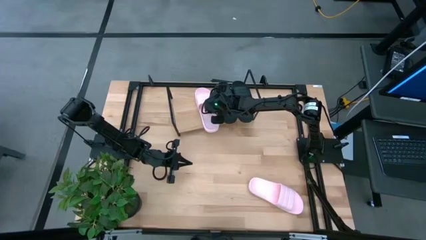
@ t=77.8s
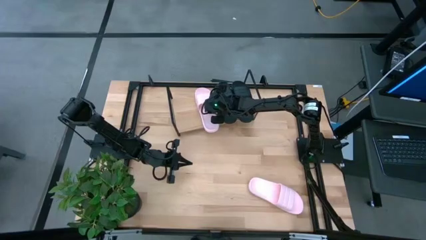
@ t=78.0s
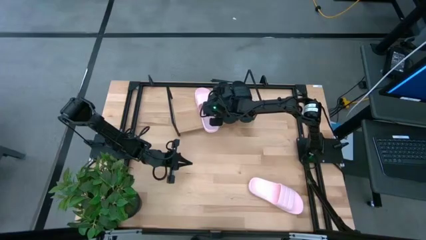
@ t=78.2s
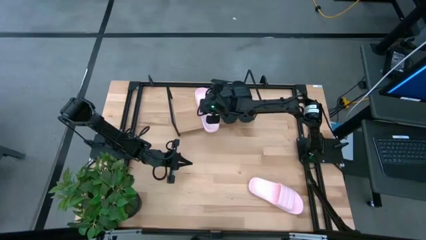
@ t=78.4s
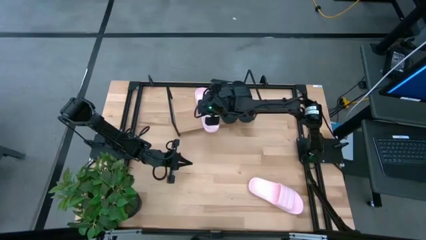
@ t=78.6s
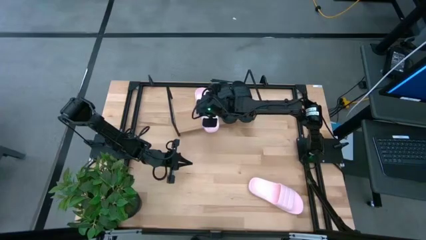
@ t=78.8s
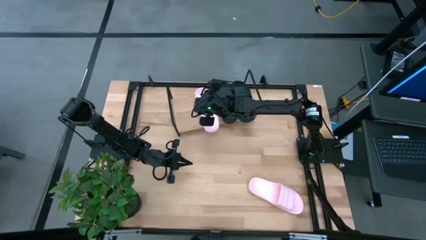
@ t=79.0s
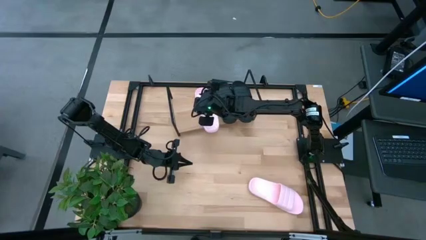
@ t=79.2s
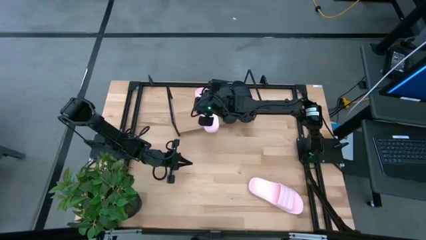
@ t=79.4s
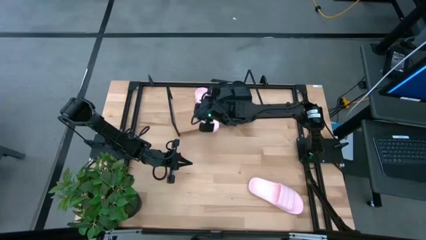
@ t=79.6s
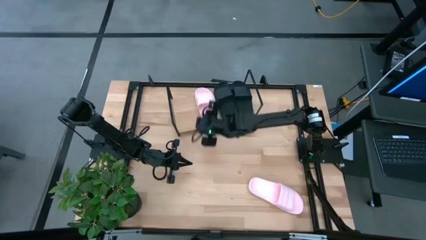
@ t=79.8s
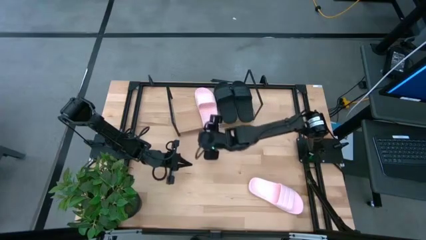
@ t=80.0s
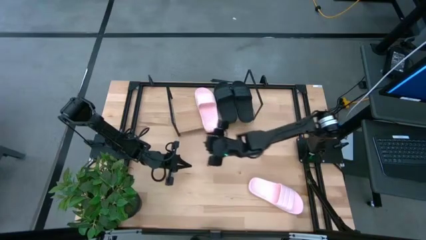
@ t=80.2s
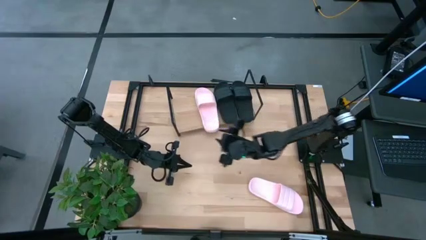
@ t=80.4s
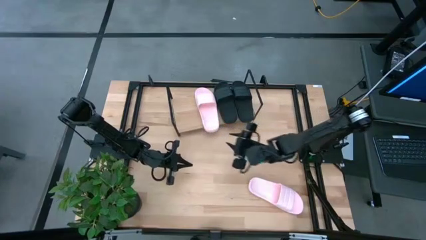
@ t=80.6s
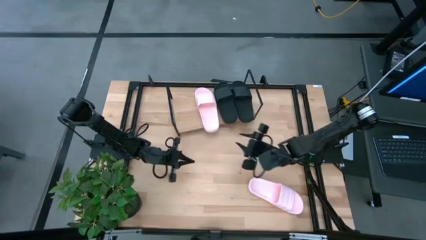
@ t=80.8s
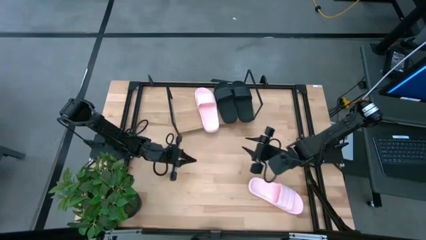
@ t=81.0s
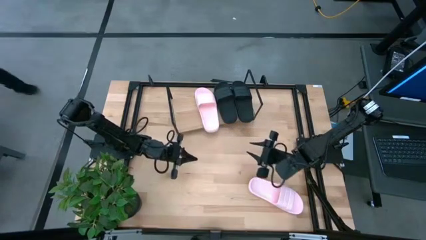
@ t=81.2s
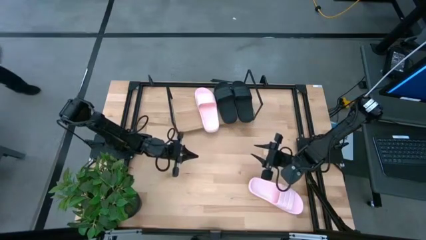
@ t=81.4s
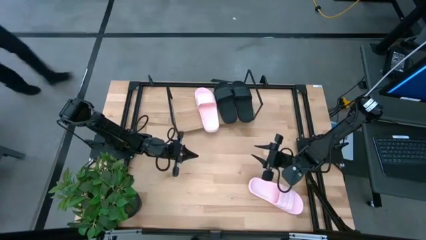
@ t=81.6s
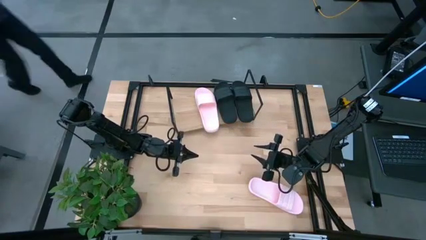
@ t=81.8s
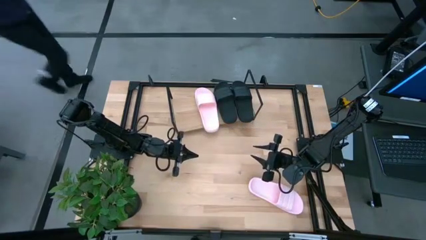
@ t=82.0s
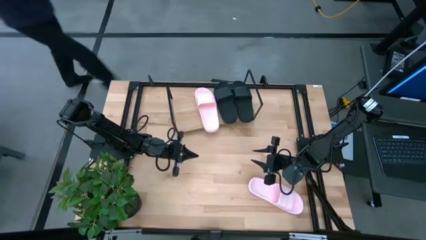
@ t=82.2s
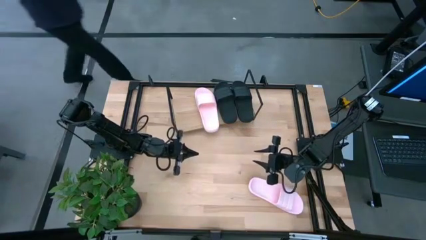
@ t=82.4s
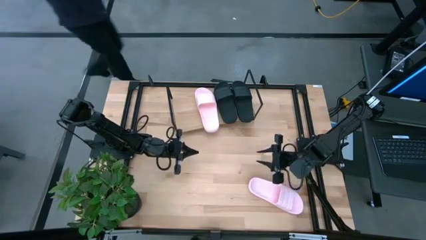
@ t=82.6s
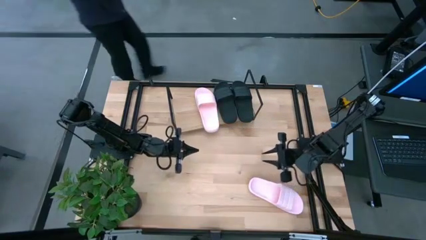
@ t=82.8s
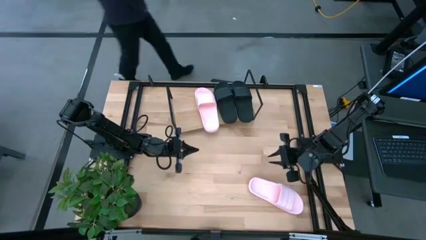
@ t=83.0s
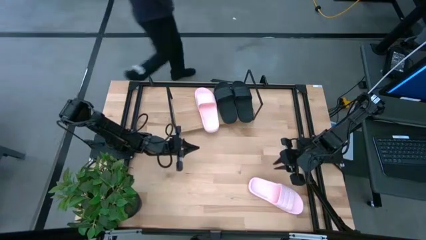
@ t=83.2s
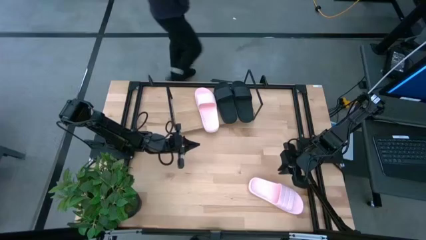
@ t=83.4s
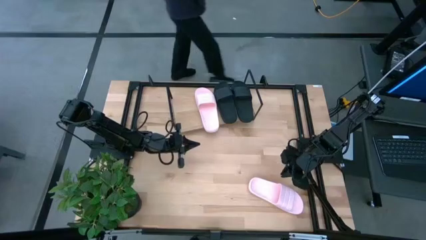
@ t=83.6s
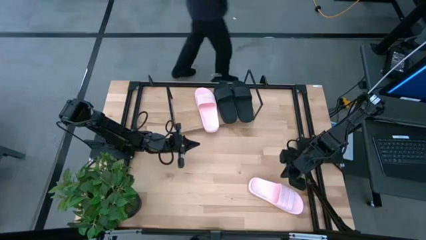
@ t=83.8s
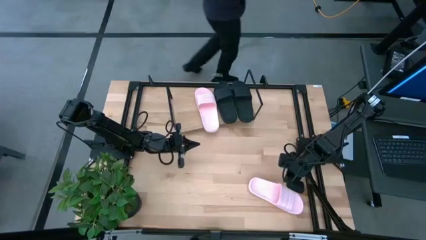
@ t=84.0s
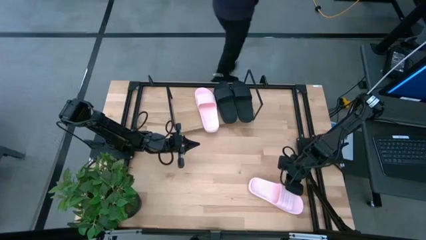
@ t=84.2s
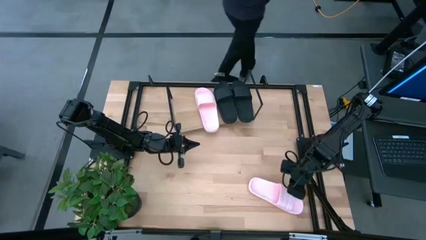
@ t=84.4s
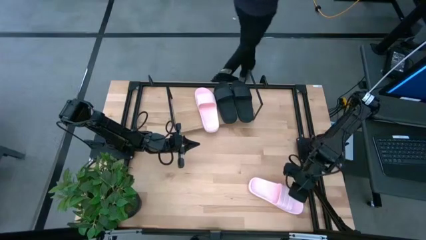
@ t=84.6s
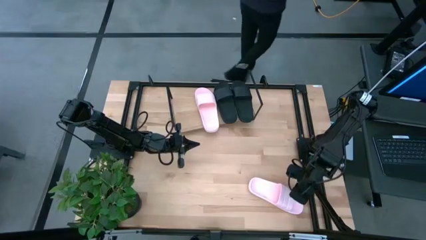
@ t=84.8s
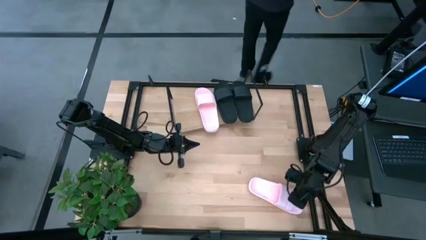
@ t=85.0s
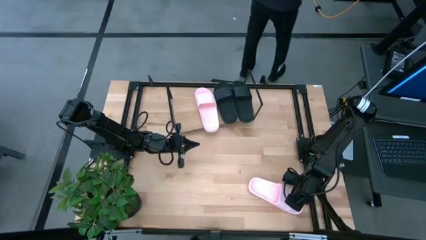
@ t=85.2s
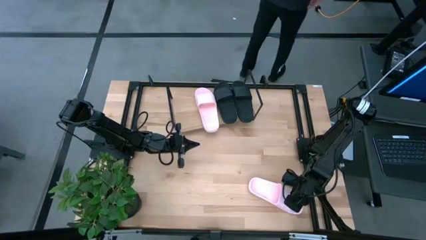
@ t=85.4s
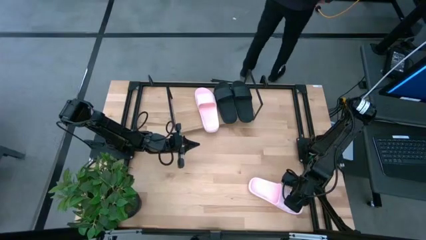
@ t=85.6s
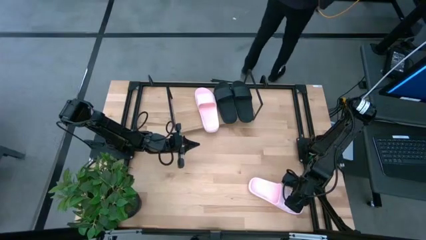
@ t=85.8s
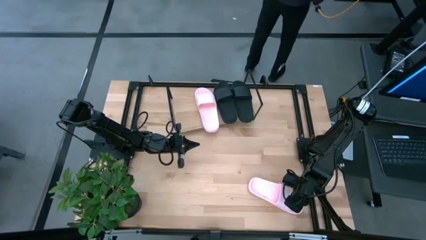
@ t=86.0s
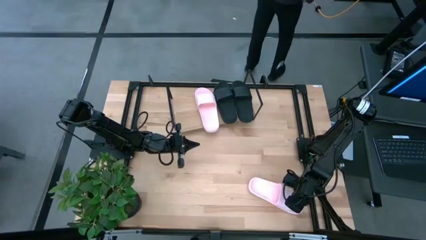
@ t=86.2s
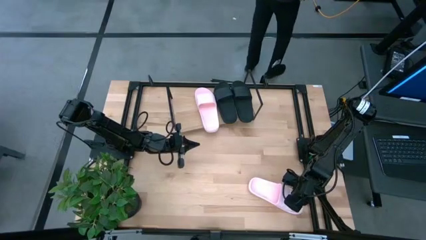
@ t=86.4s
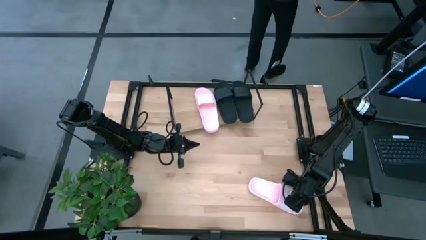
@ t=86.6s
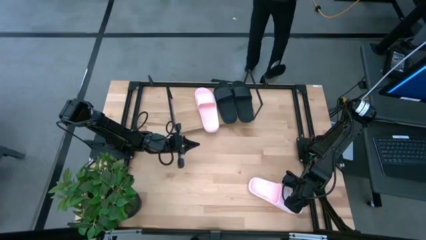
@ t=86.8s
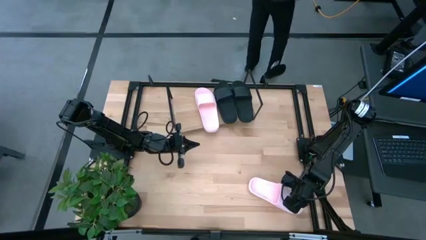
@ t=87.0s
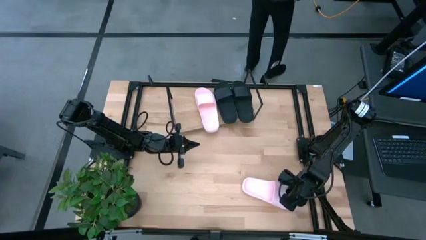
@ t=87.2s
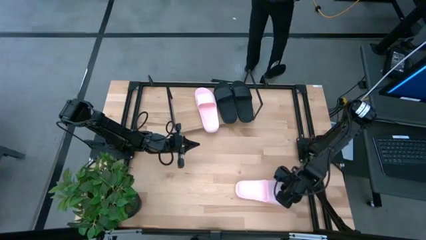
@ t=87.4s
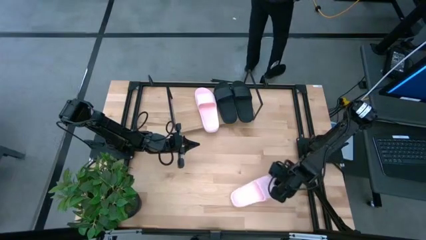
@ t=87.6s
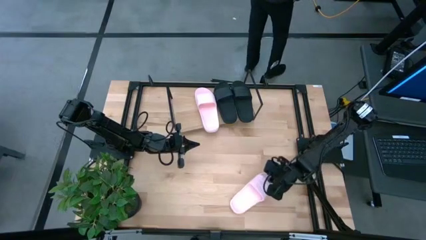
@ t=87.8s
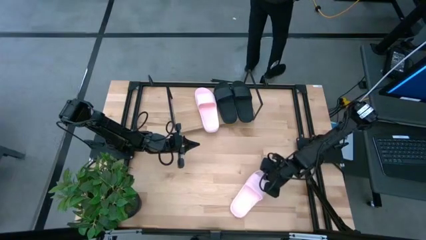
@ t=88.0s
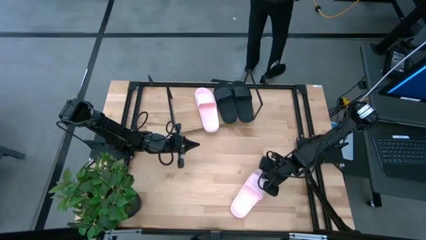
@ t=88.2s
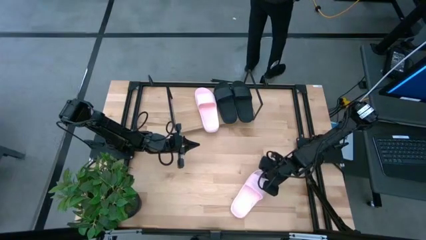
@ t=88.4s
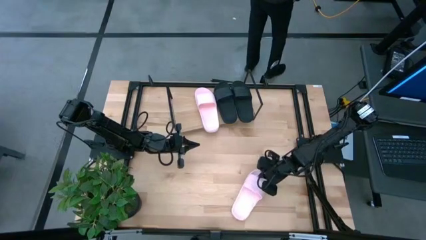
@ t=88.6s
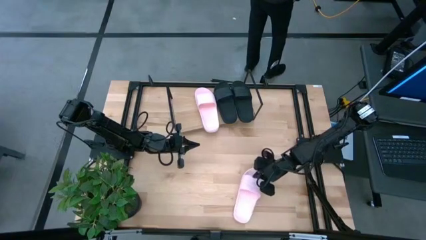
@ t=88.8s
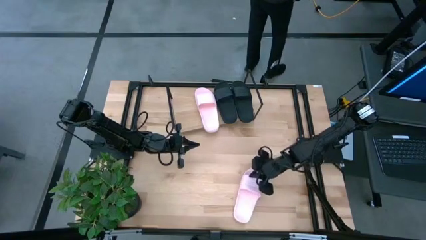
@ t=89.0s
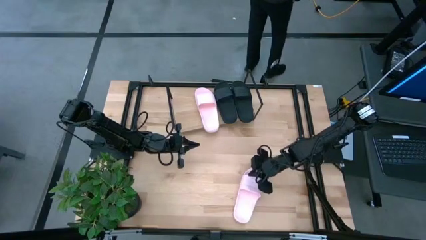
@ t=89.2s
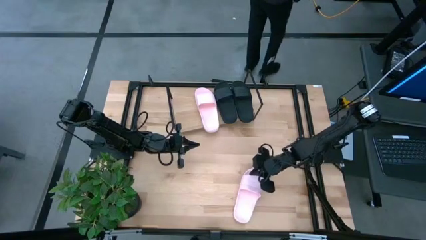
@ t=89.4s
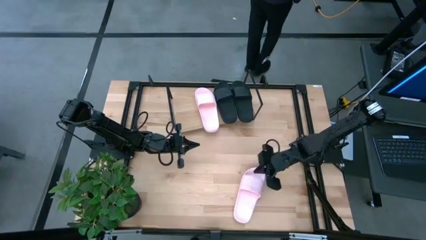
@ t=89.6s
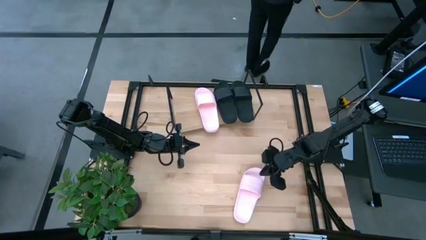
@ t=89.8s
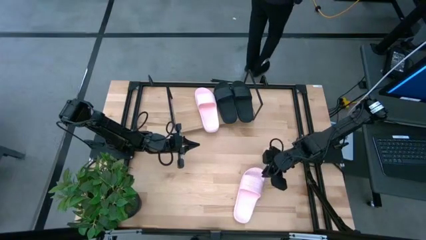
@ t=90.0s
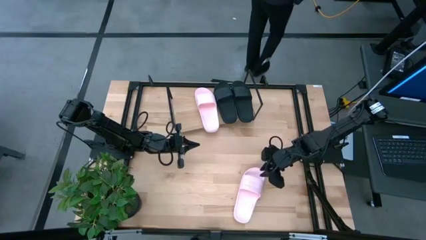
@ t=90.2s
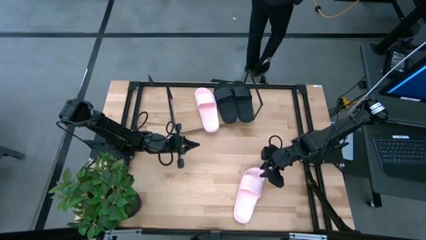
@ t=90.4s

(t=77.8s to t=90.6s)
Task: Pick and place slides into the shelf
Put the pink slipper on the shelf
